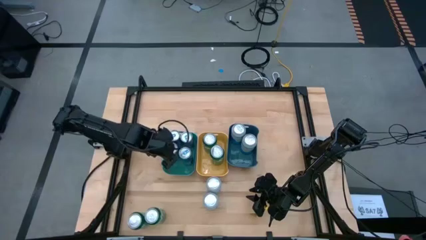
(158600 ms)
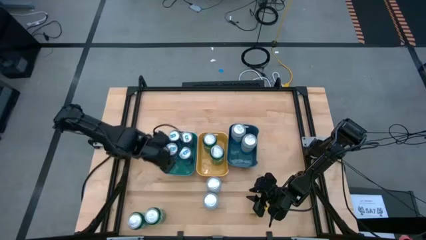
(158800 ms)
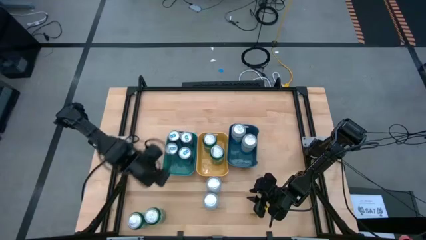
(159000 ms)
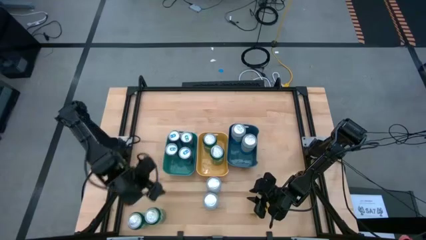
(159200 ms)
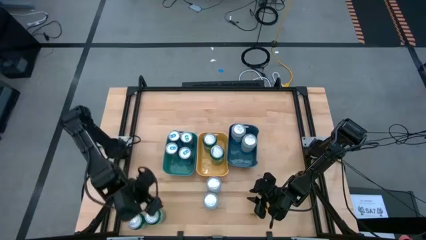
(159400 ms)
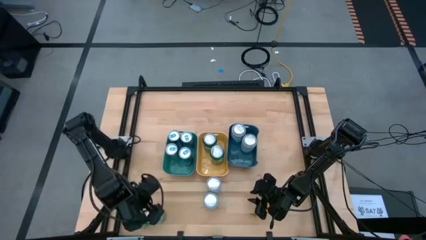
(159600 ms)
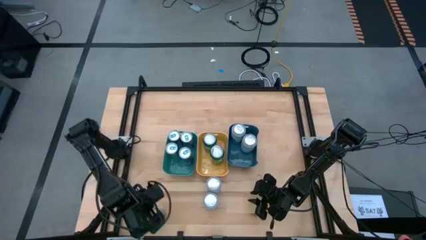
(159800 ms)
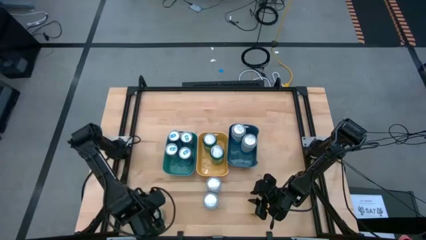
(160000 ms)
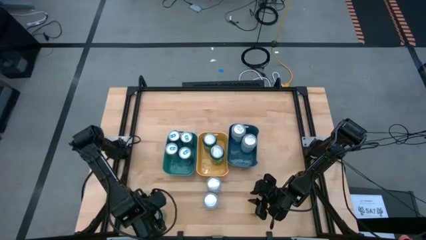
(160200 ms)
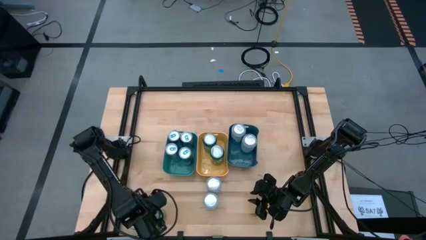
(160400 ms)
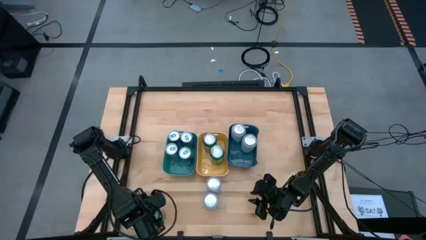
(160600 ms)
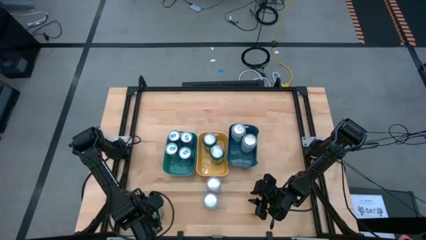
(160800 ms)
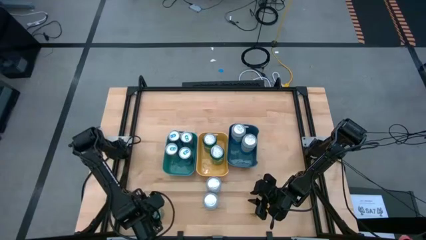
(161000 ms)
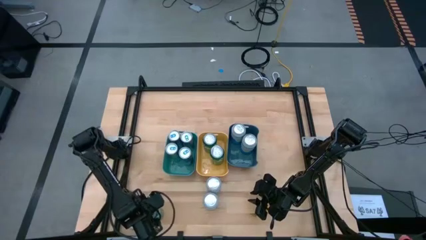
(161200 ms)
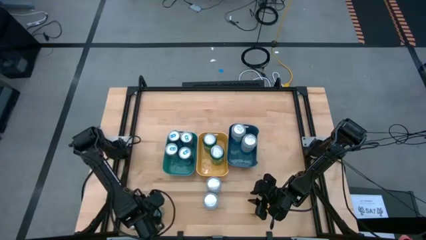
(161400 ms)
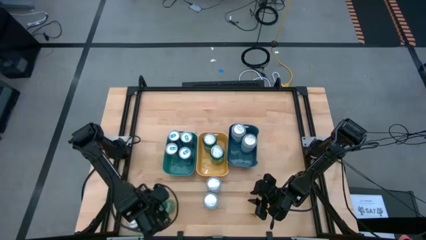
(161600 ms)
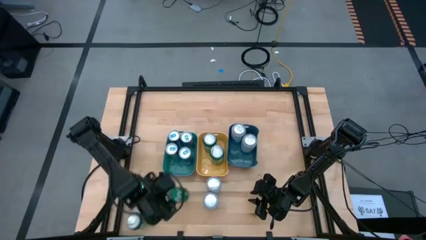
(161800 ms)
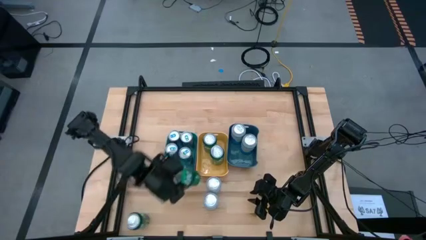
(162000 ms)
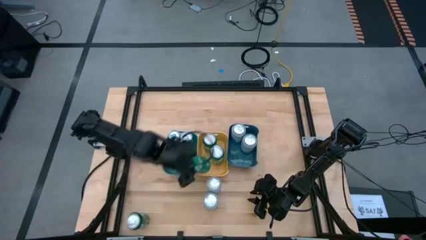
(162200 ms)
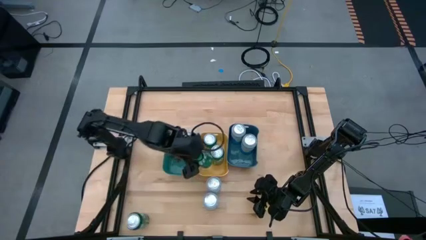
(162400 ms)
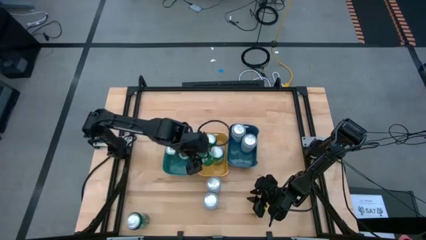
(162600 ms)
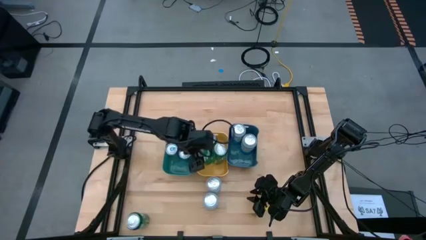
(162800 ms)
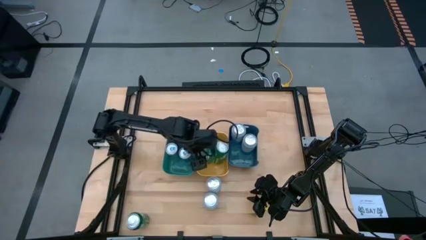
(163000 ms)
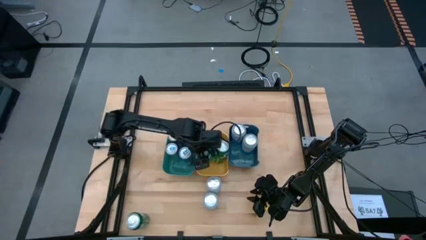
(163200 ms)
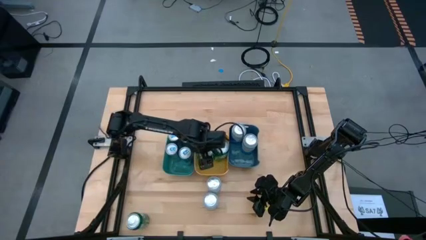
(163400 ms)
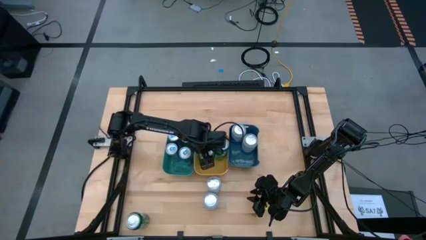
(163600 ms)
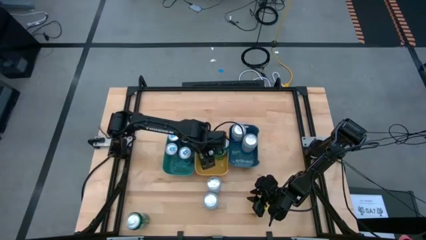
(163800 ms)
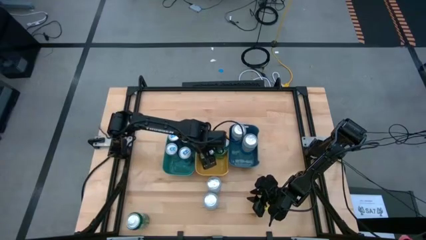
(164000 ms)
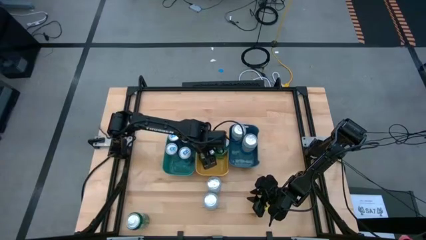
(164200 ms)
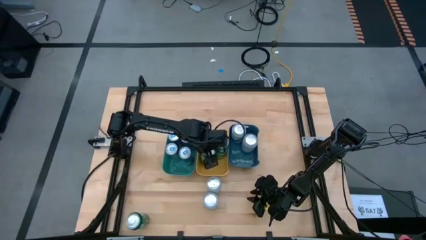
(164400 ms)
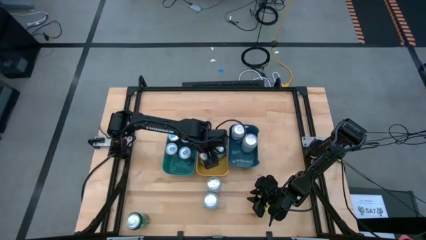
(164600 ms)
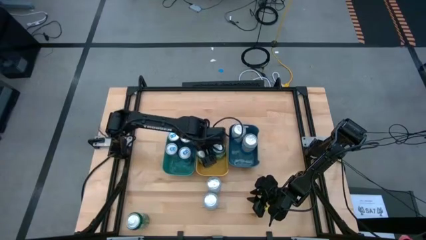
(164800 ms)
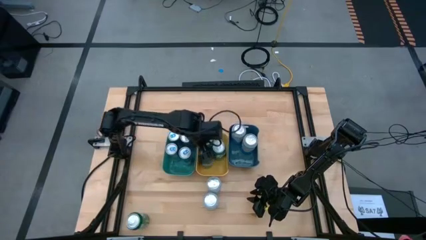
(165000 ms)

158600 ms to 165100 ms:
Task: Sort soda cans
Put the green soda can into the yellow bin

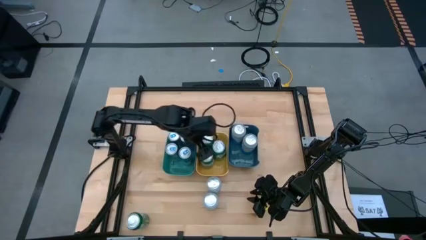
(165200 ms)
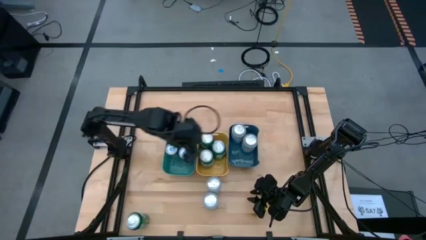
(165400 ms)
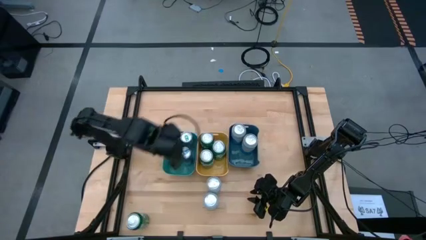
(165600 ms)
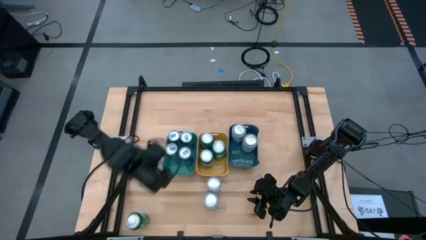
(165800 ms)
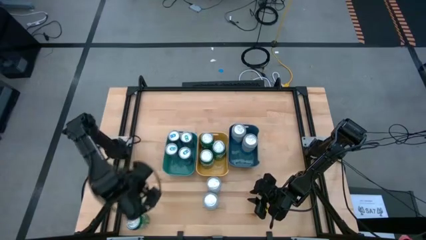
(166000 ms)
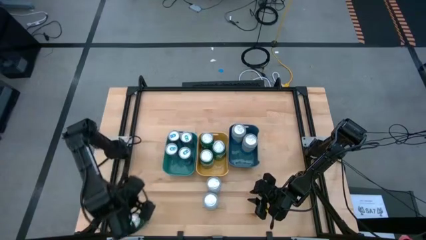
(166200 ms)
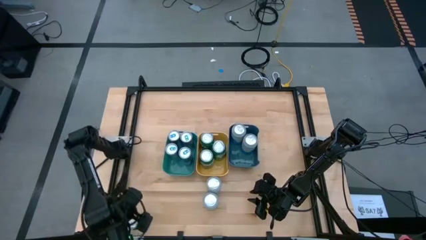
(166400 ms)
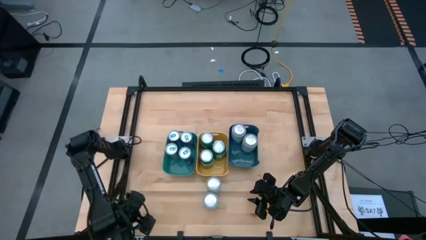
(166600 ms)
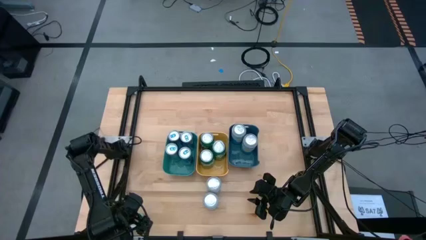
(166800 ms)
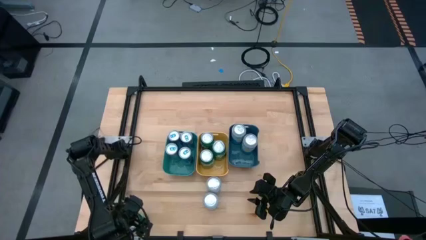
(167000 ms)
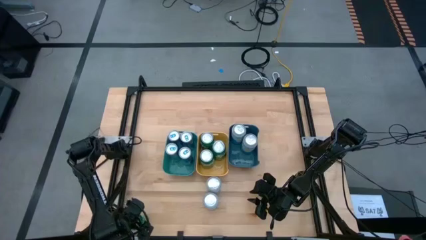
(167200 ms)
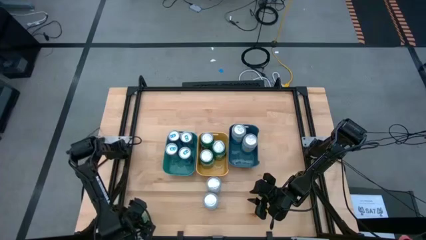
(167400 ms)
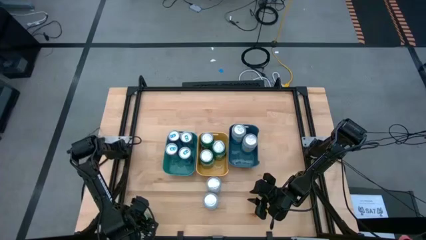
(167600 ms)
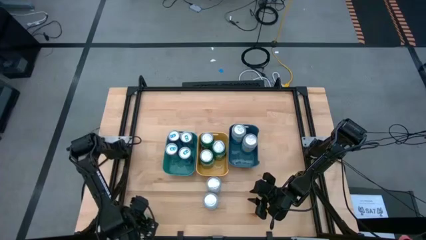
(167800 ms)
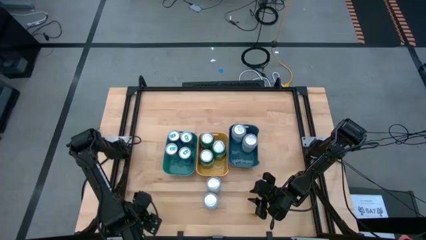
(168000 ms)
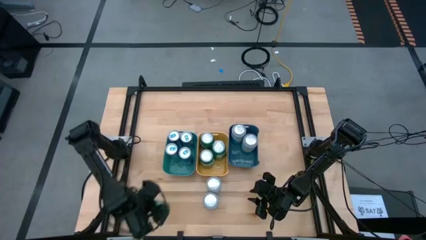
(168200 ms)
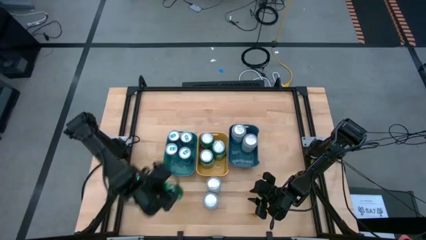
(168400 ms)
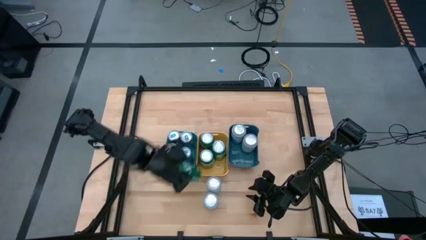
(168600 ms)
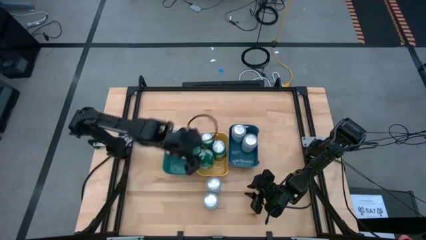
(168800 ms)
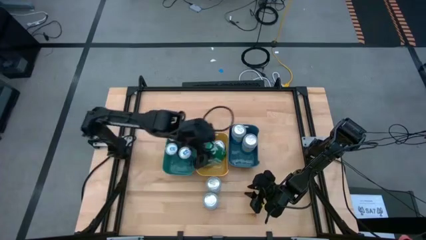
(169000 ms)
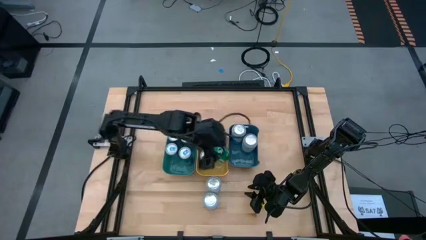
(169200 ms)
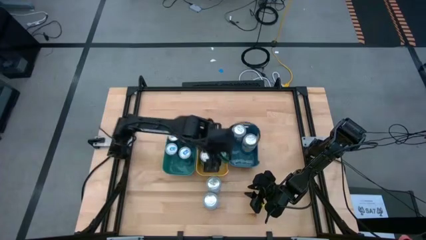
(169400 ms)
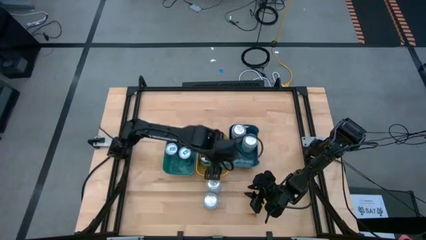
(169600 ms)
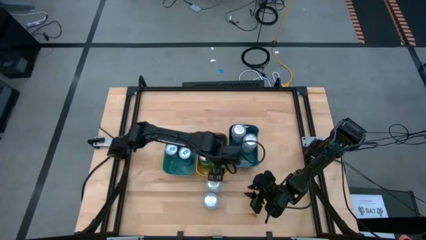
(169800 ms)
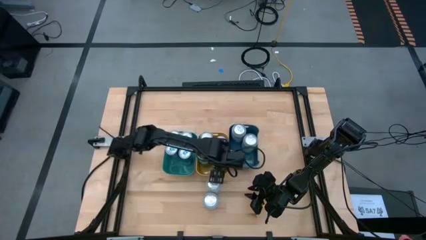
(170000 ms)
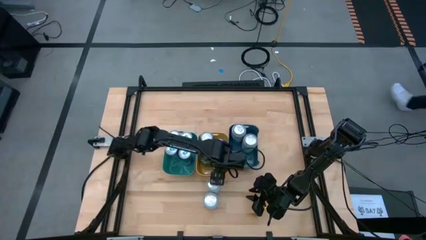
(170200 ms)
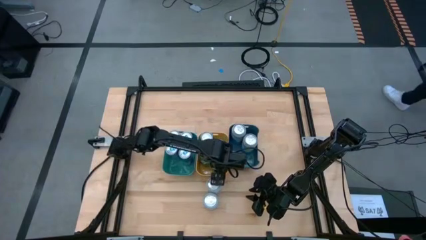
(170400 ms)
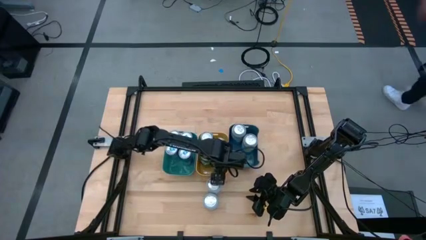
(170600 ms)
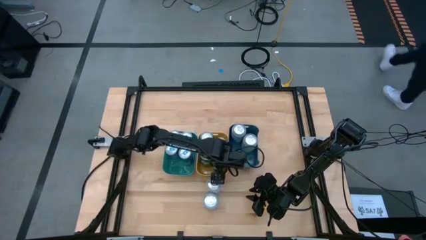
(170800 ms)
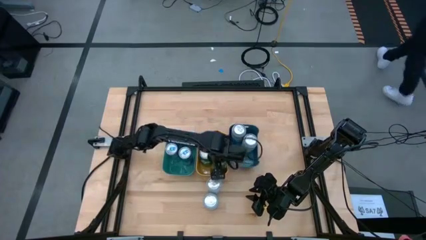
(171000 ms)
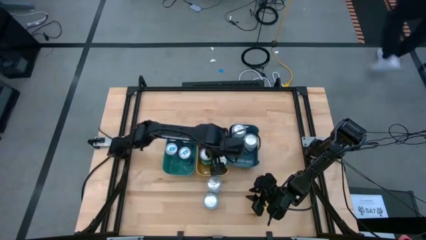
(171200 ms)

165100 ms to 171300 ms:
Put the green soda can into the yellow bin

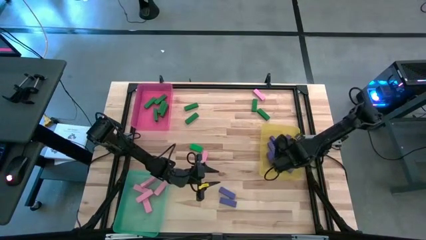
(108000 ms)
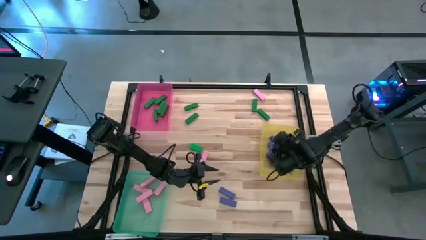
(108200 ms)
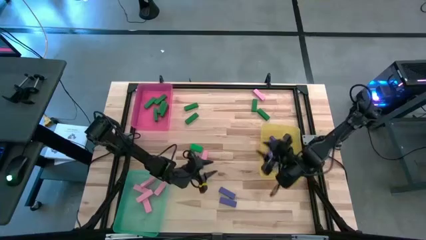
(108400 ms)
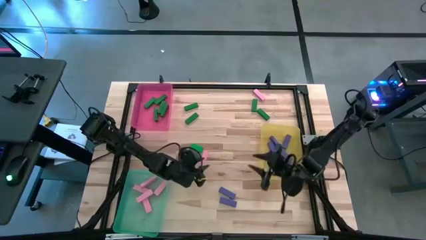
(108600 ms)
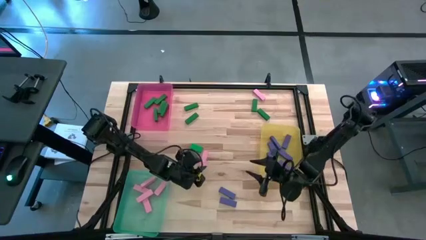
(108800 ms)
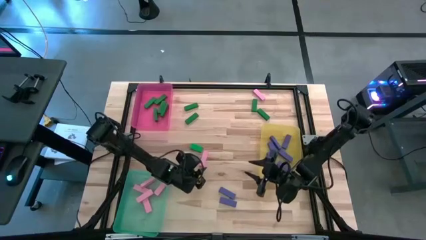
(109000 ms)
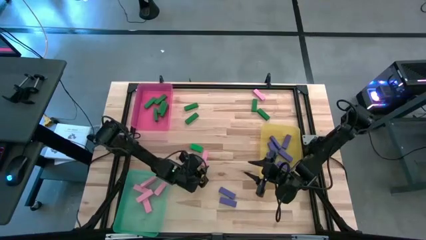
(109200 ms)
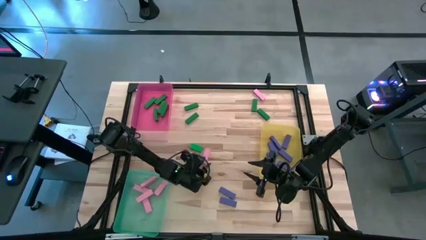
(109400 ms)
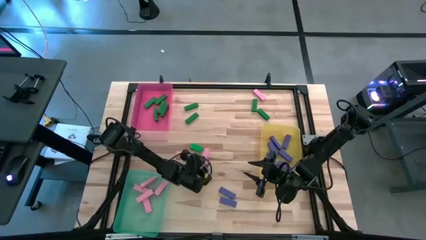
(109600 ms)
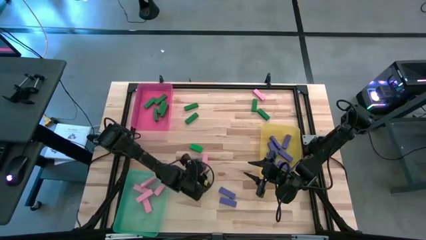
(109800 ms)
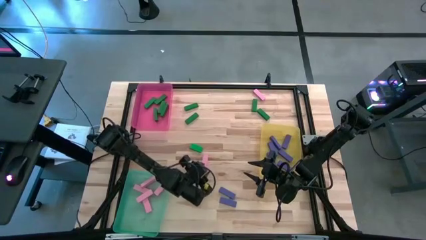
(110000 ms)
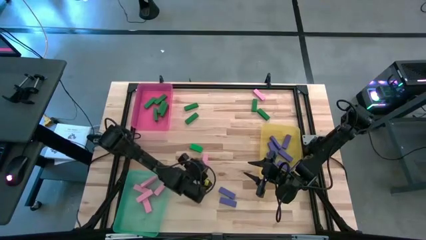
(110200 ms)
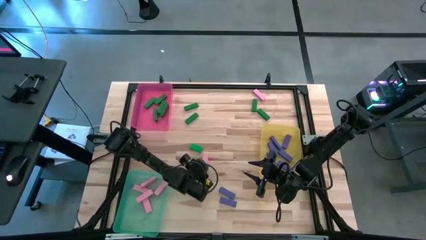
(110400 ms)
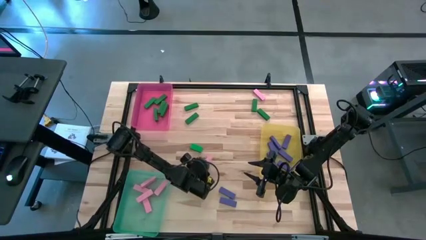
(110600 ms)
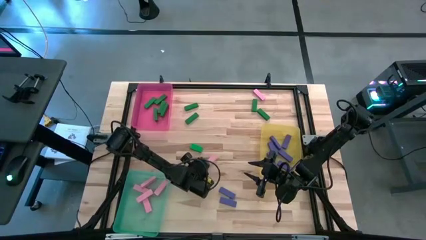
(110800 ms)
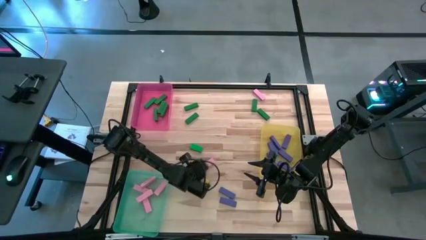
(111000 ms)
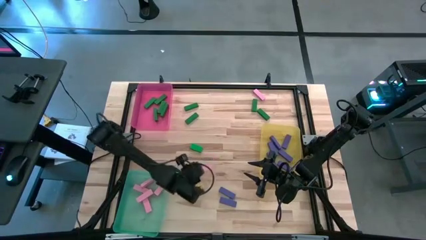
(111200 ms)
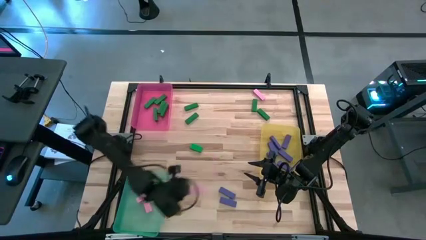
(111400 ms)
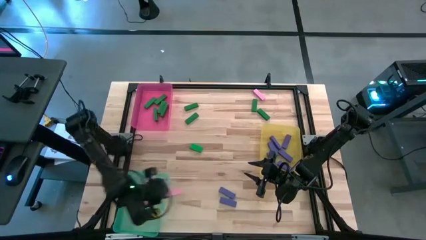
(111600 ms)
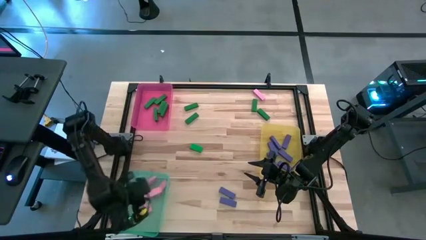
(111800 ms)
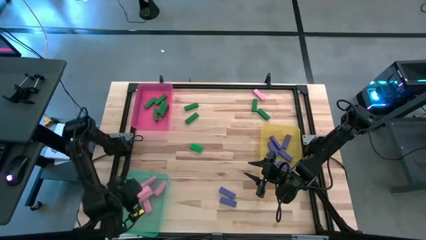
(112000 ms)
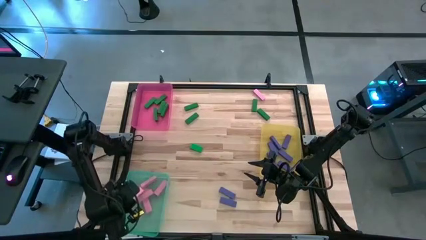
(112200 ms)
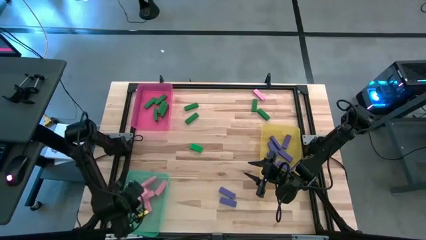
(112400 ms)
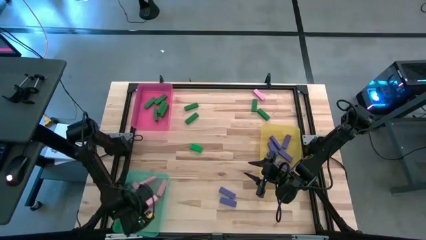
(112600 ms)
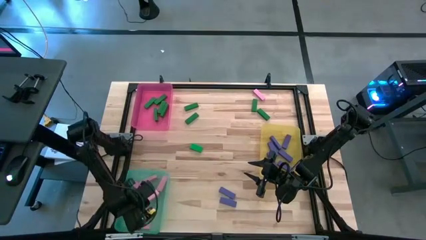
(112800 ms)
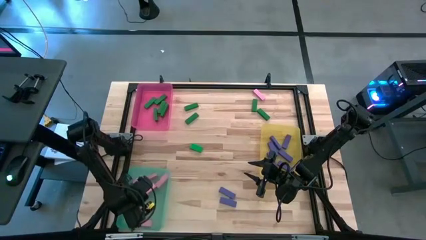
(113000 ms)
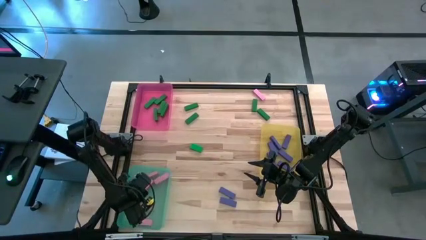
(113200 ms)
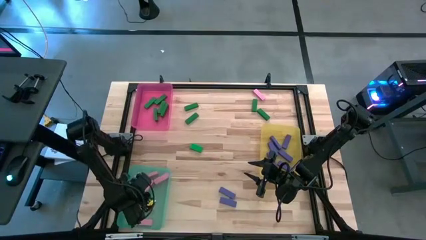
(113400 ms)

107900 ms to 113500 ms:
Task: Sort blocks
Put the pink block into the green bin
